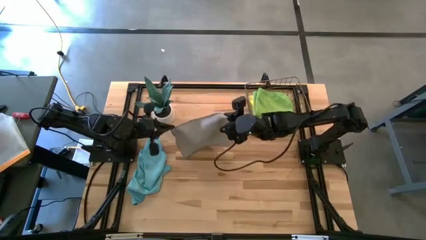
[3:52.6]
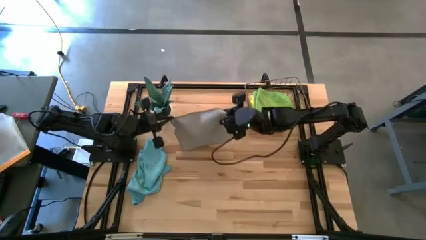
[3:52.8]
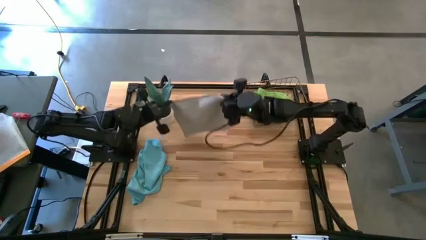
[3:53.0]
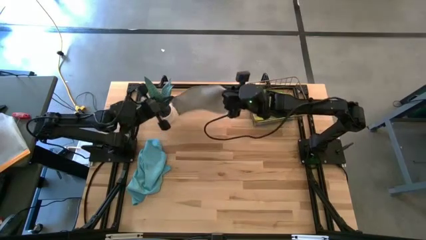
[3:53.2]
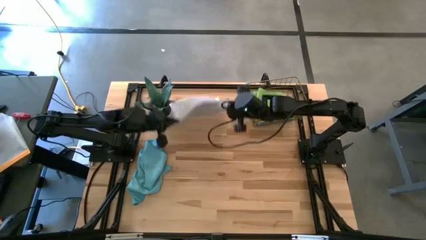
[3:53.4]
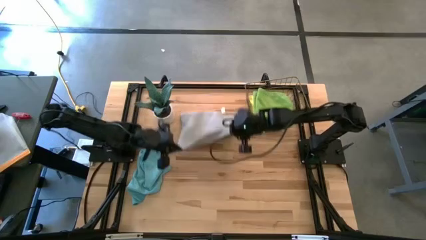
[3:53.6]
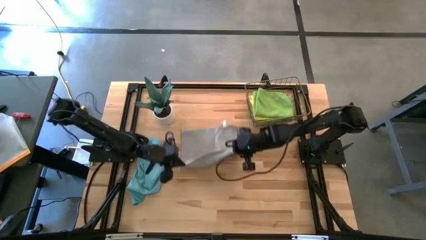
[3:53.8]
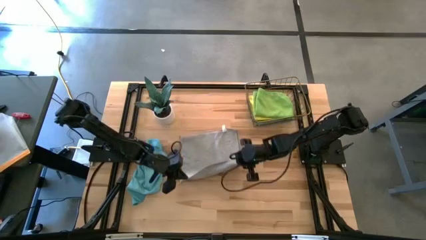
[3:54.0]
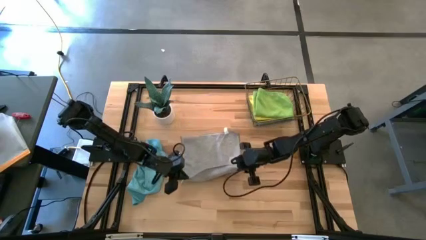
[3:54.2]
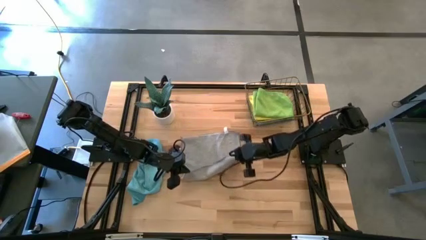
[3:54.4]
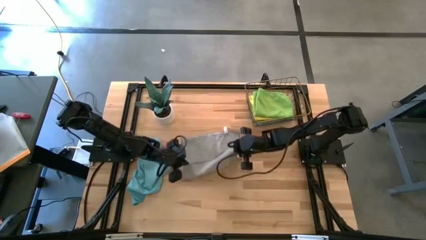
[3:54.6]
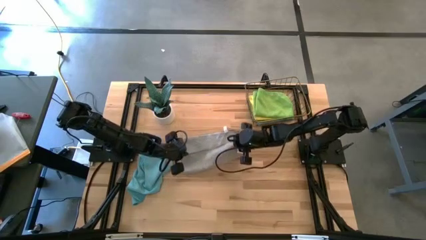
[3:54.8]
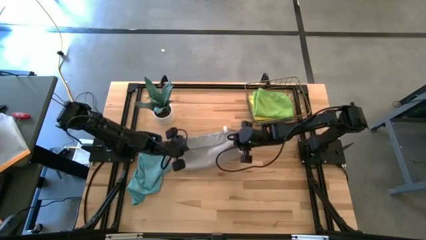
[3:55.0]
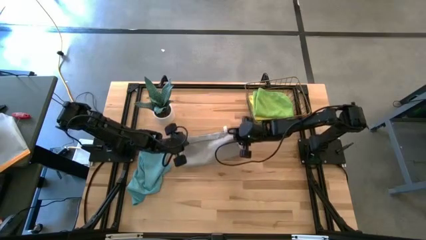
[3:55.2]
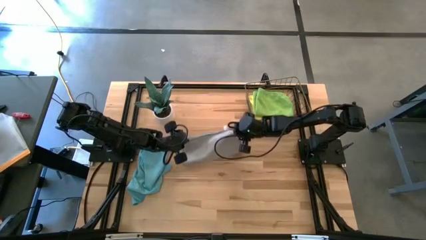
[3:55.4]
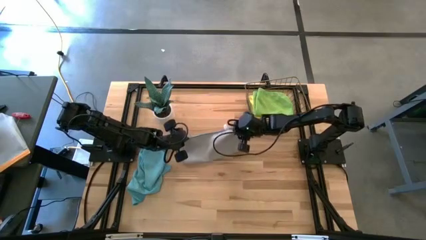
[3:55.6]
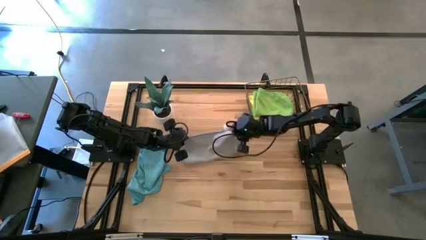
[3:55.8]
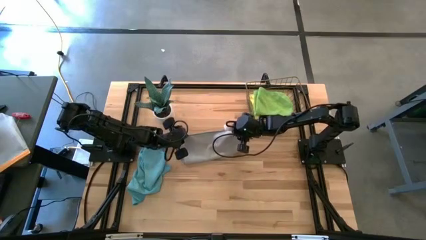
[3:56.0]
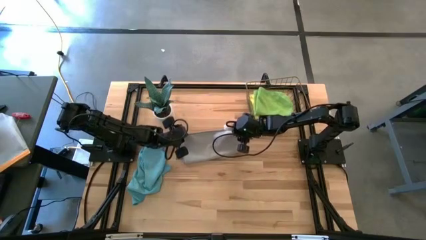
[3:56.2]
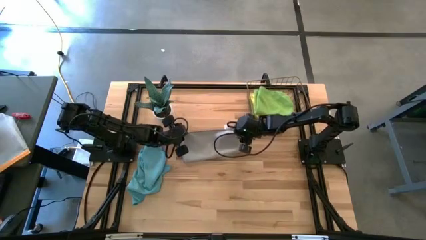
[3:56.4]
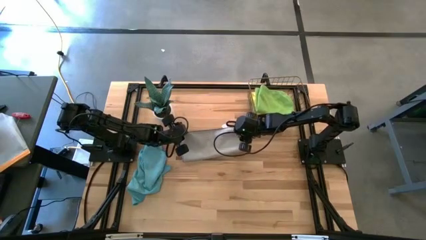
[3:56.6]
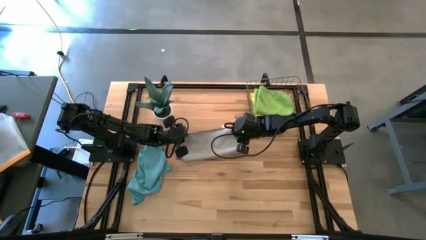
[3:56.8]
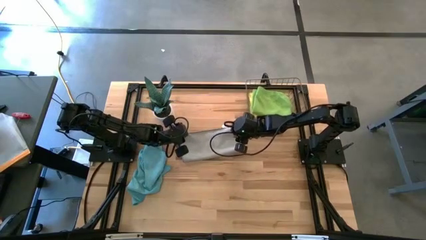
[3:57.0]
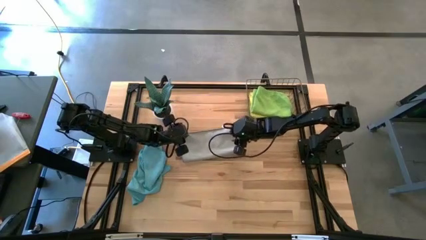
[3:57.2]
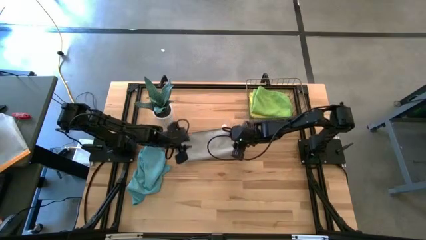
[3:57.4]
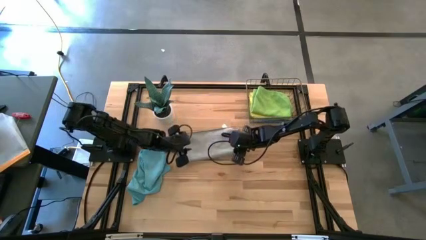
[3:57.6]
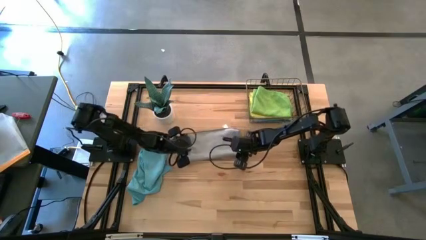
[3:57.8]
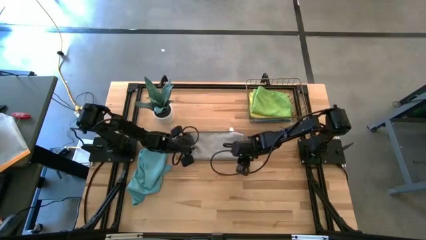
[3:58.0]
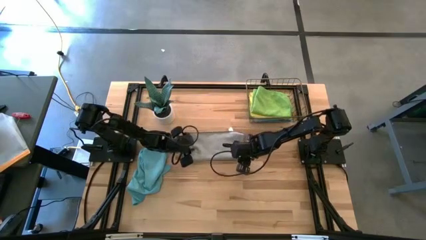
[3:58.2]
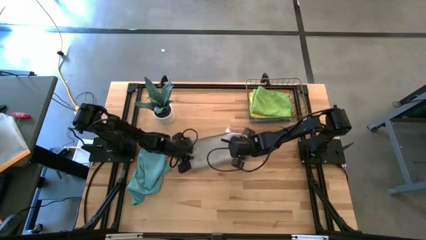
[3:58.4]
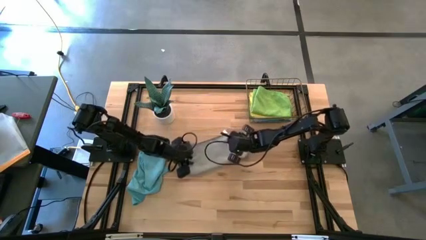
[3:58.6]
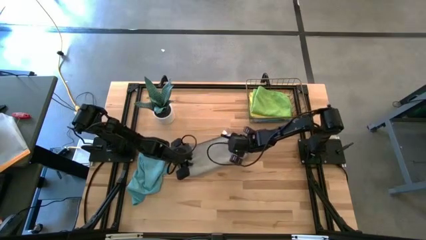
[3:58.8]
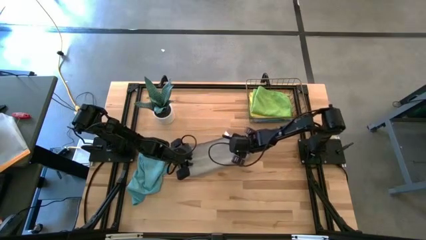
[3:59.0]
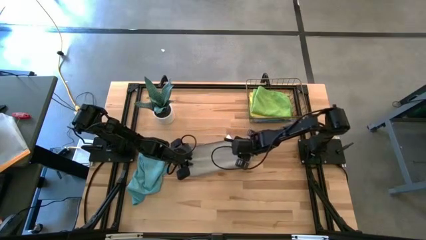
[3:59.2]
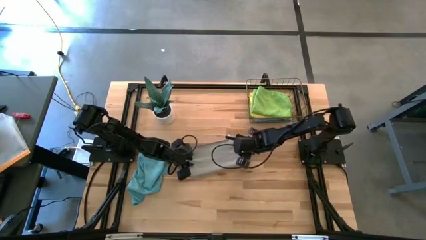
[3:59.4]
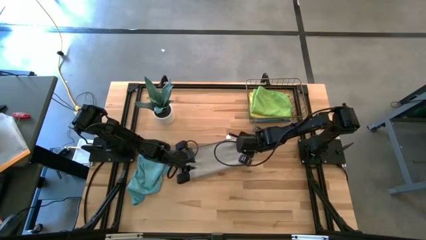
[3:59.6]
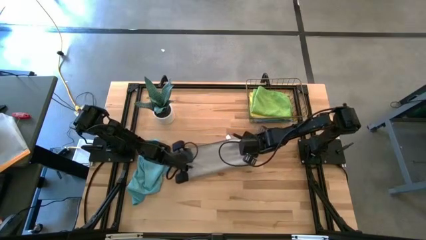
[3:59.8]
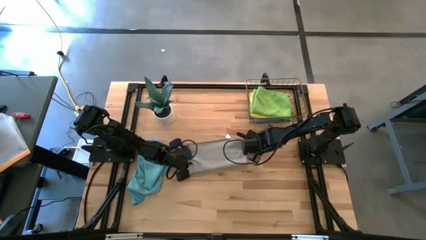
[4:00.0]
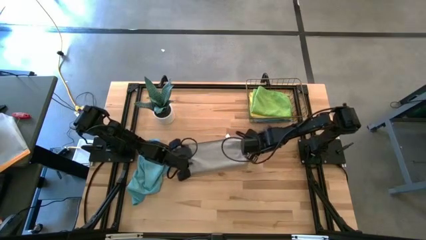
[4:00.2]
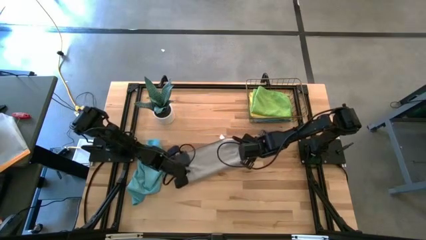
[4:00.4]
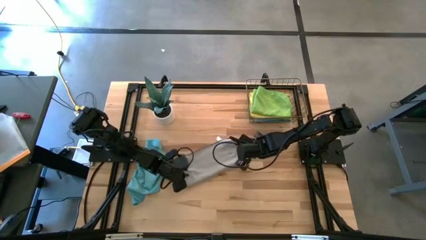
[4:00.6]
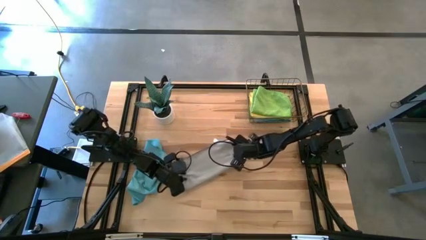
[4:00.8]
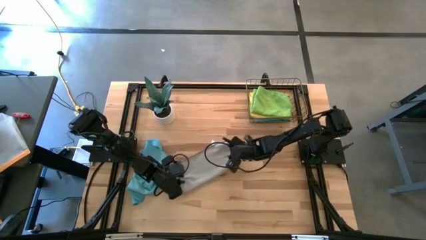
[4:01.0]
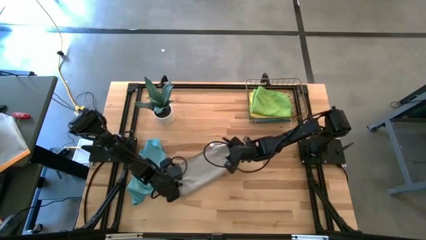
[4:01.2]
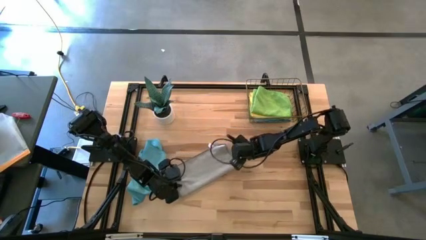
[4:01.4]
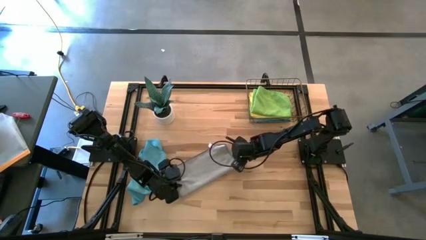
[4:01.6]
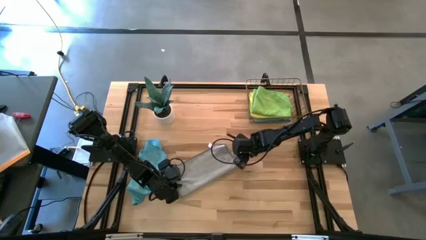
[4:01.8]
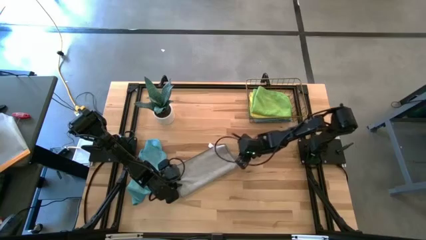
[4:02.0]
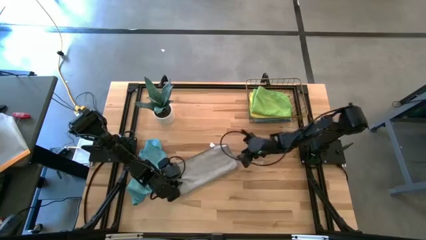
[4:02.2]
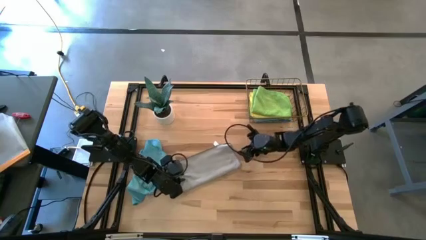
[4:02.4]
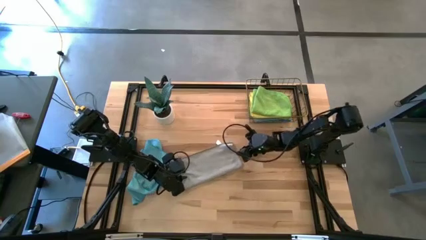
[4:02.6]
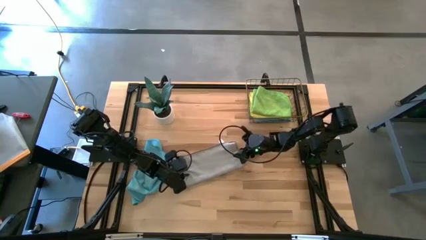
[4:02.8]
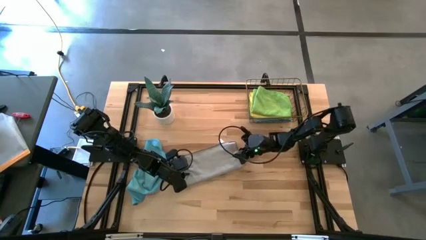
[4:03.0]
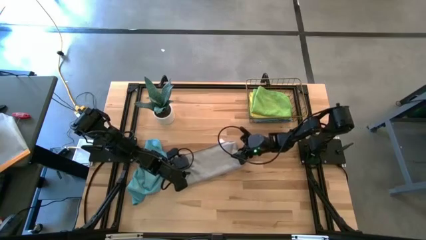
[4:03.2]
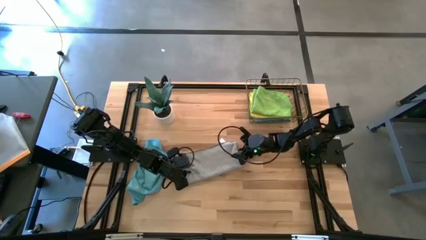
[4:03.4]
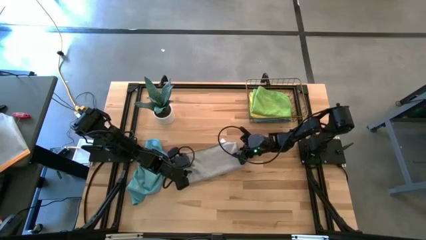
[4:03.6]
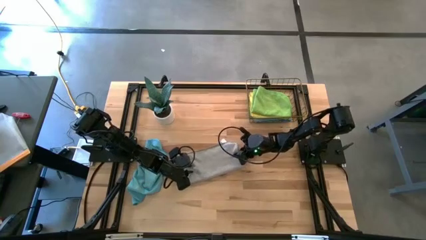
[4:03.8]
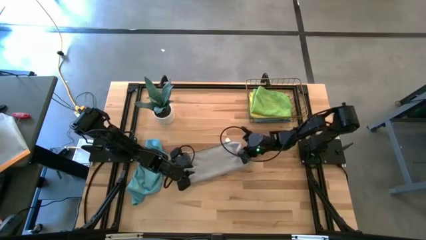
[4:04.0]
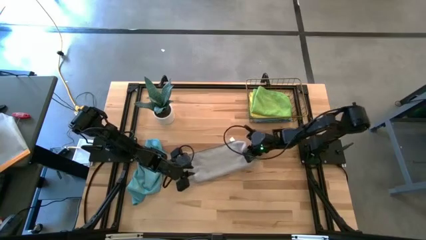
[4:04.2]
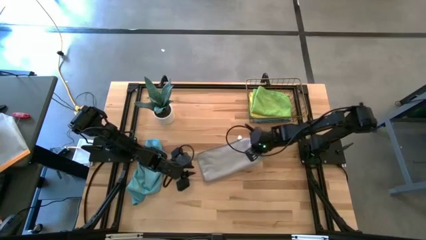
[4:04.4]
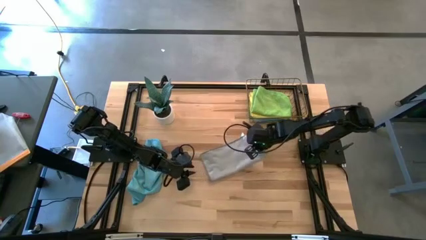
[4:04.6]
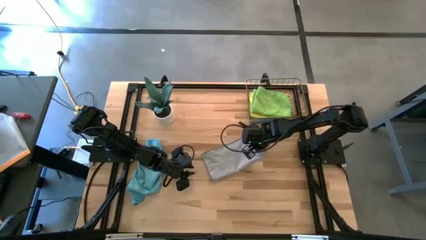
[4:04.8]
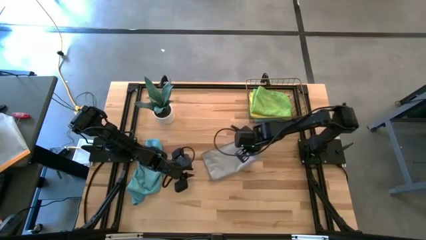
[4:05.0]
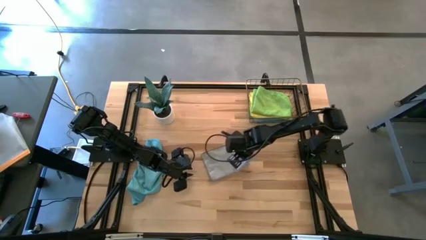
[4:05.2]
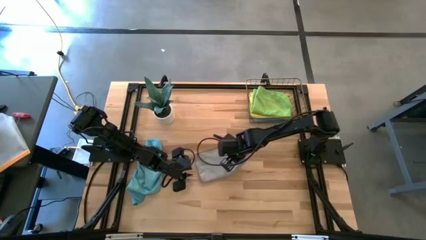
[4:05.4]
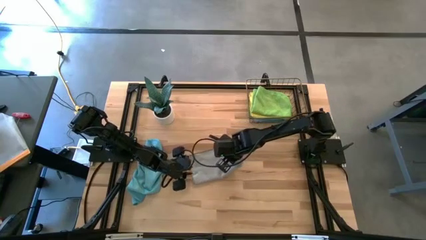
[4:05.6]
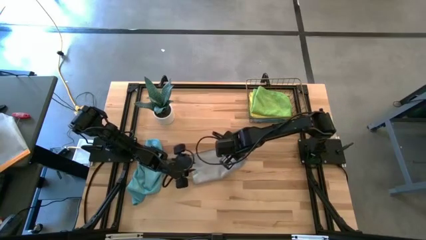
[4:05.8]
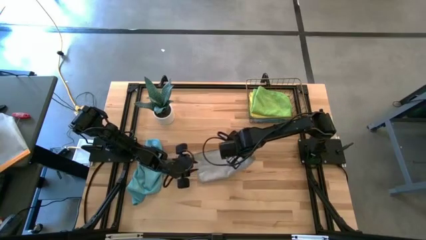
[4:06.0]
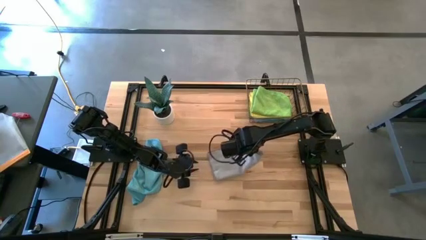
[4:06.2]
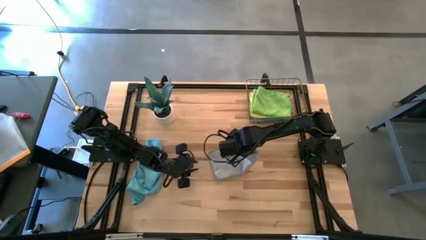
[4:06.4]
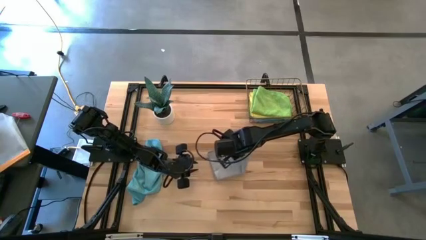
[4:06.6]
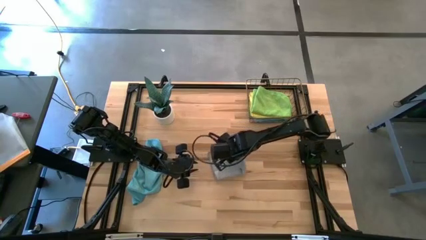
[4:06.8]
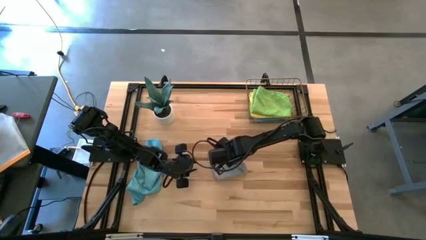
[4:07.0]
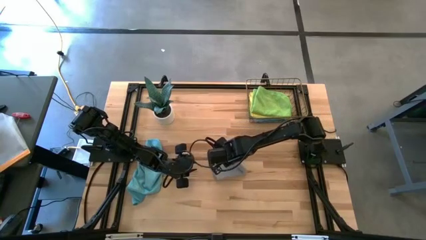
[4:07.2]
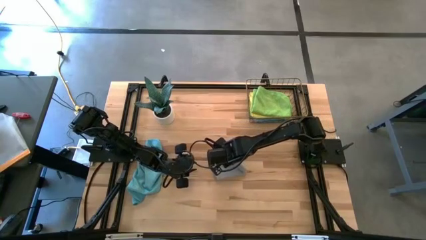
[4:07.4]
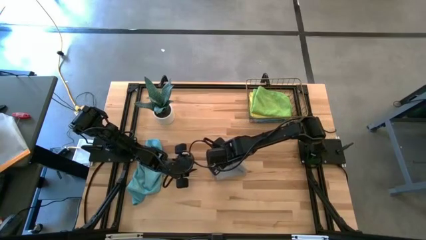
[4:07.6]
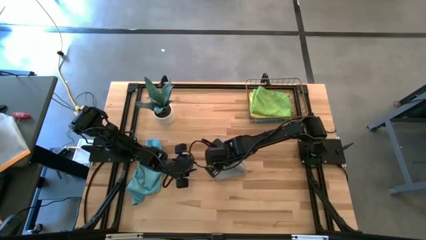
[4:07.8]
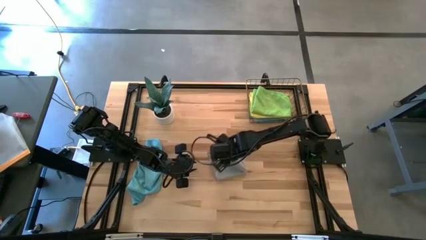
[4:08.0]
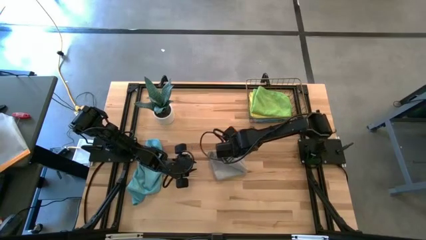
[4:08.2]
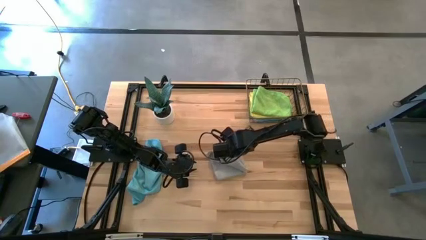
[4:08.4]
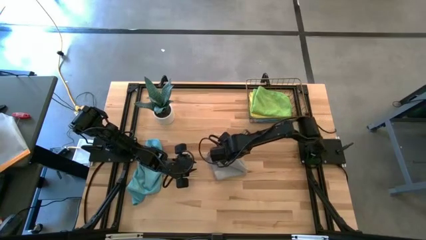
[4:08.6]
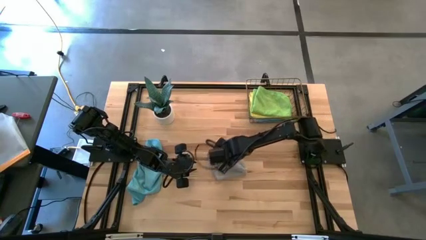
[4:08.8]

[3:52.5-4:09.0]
Task: Fold microfiber towels
Fold the gray towel
